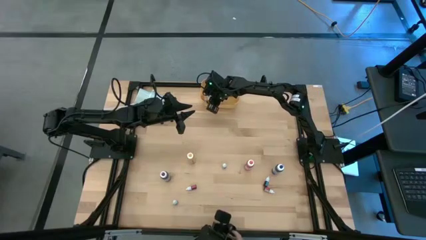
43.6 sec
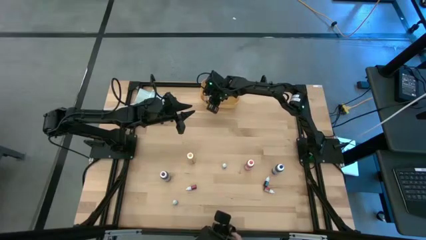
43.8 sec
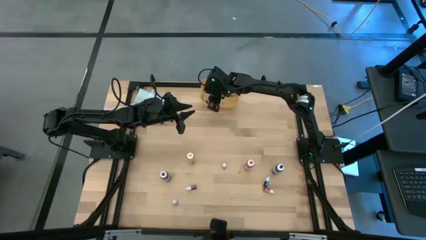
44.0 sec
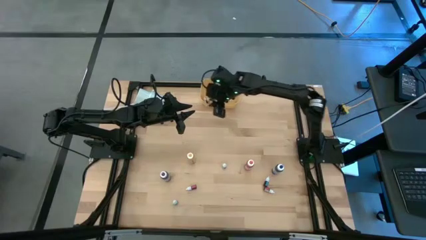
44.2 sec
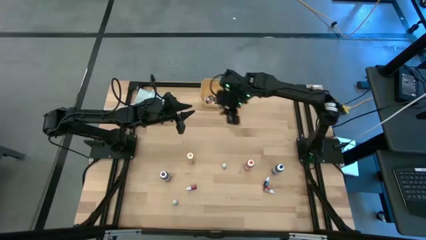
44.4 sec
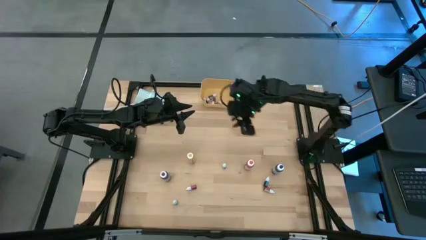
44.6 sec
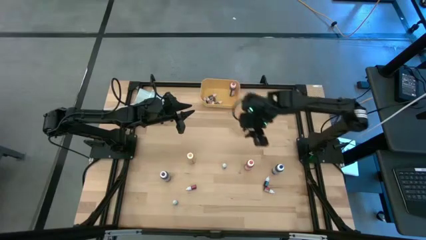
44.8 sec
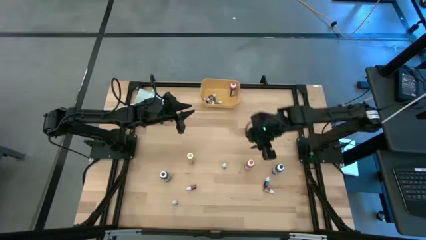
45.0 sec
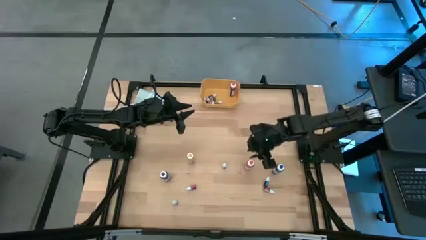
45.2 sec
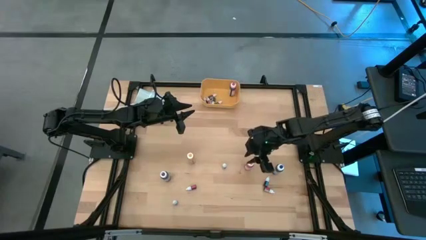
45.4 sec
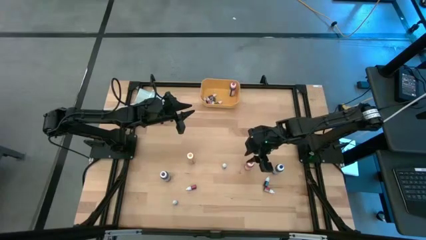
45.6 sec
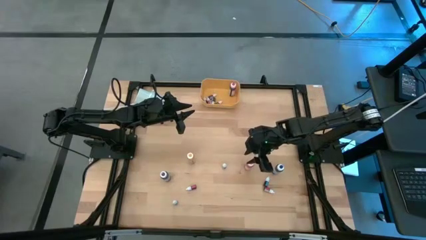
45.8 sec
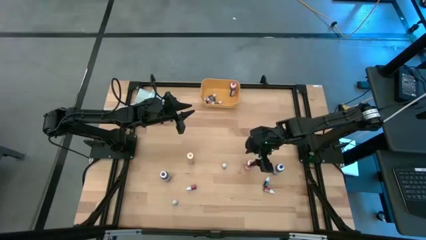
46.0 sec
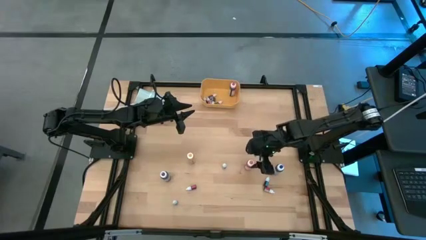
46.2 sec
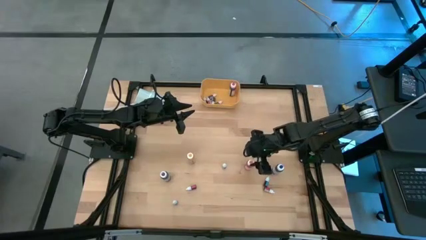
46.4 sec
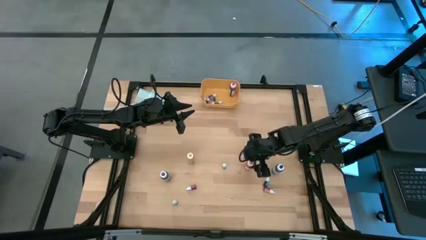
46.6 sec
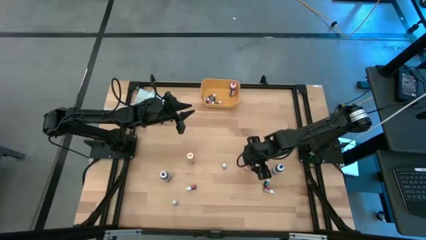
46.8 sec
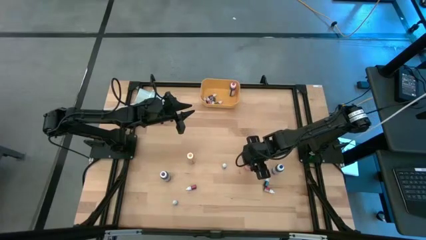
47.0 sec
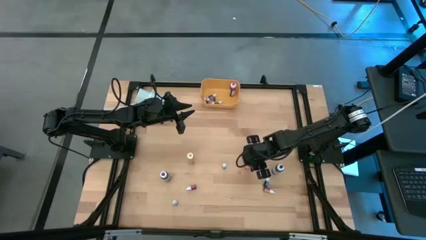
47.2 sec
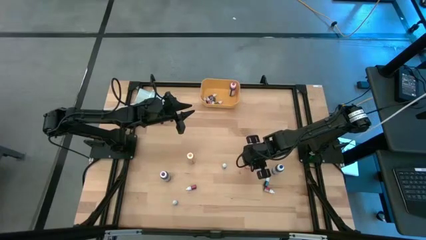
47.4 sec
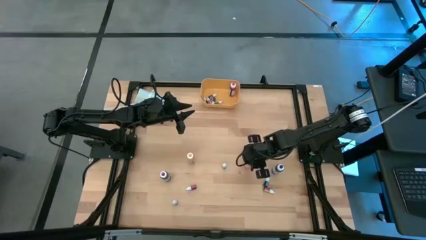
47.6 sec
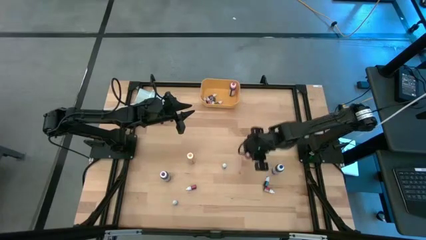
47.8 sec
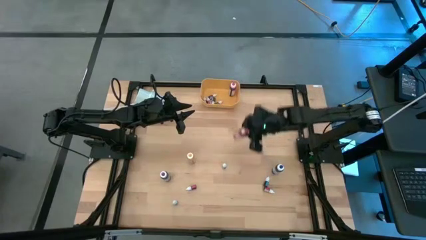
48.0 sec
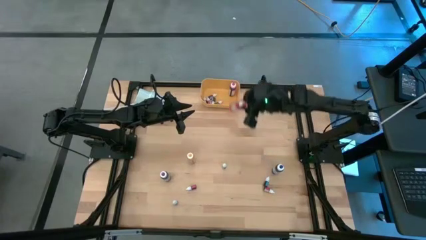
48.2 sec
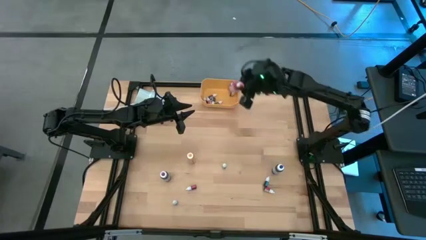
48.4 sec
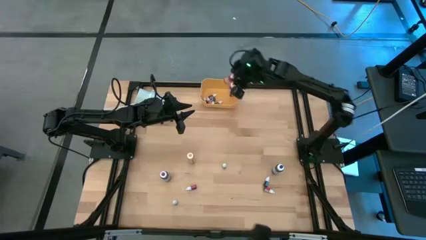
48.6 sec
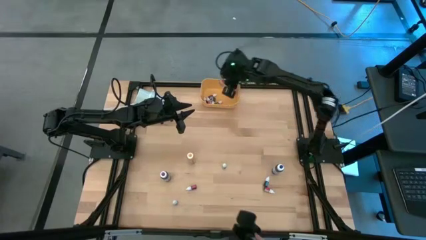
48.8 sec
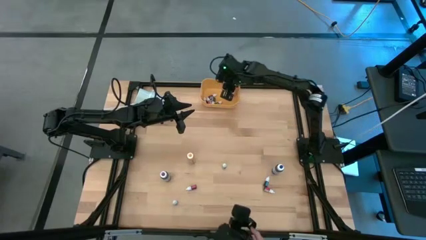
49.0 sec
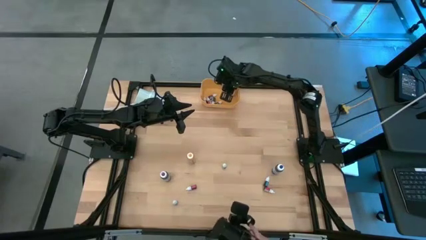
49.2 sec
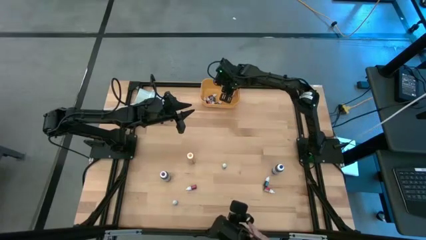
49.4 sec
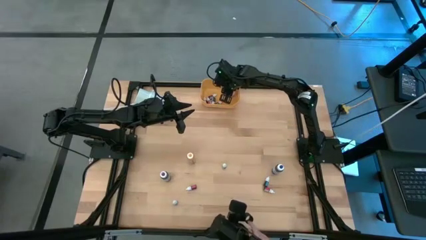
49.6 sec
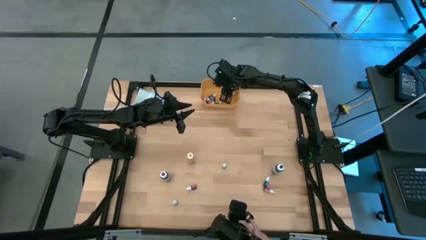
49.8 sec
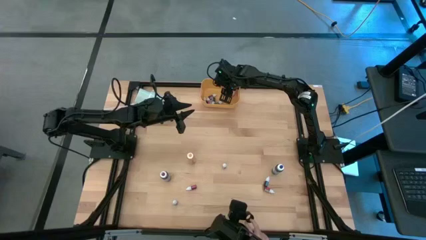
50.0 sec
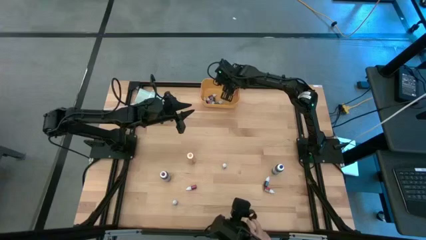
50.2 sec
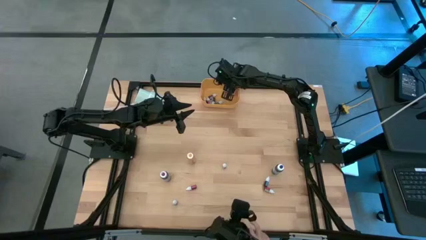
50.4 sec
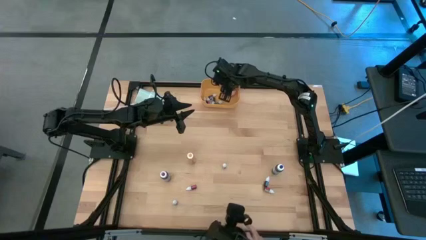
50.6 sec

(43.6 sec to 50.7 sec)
Task: Pick & Place food coloring
Put the orange food coloring bottle into the yellow bin

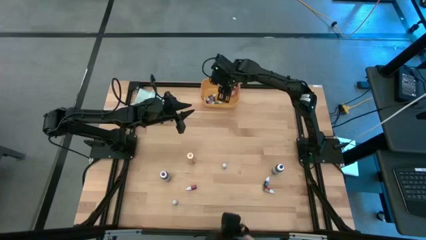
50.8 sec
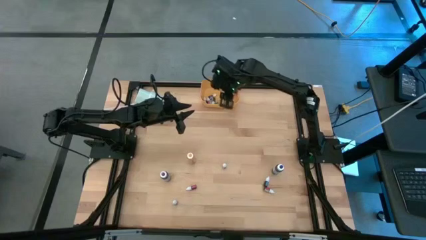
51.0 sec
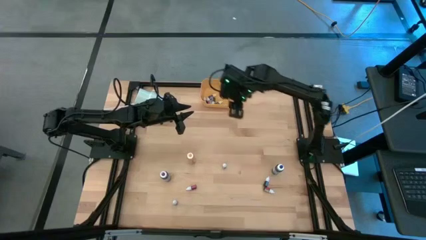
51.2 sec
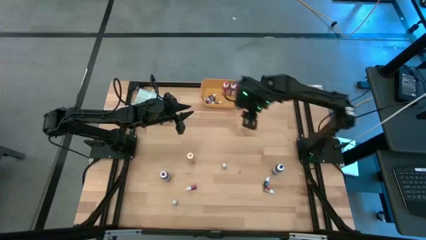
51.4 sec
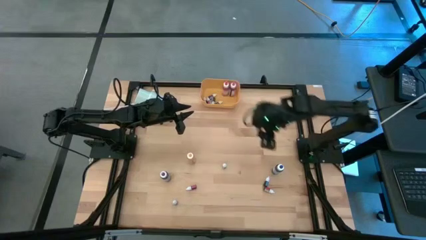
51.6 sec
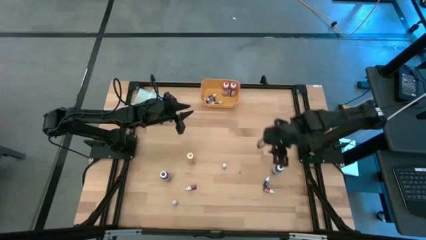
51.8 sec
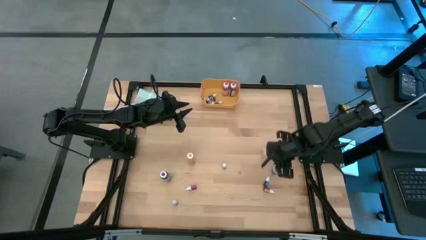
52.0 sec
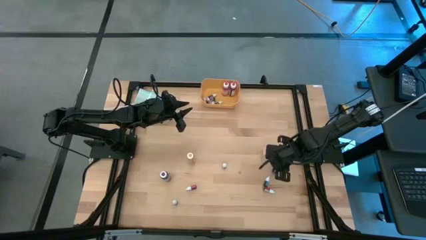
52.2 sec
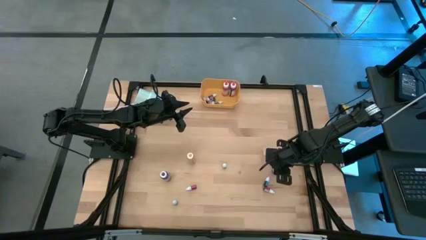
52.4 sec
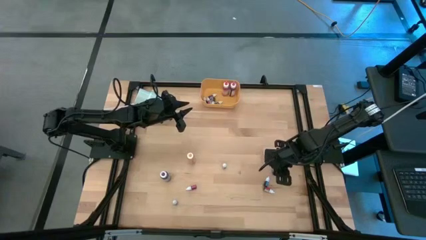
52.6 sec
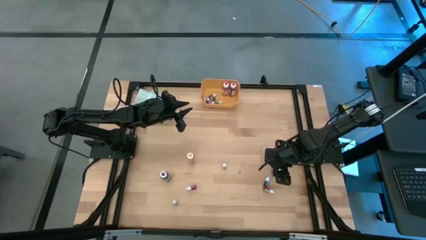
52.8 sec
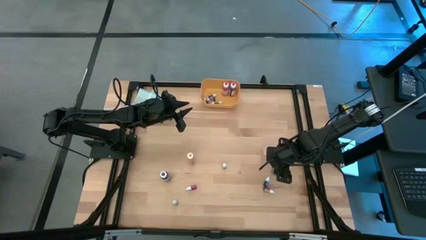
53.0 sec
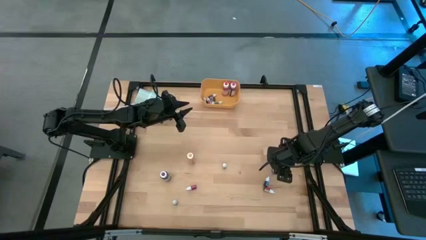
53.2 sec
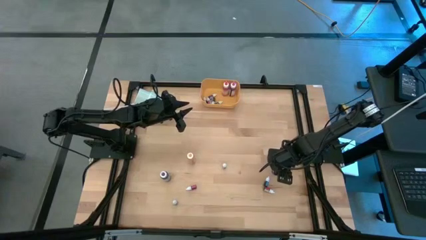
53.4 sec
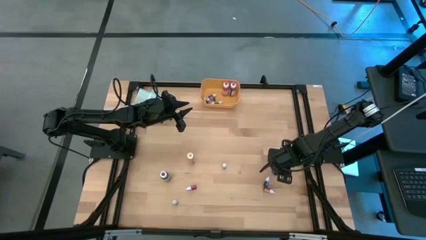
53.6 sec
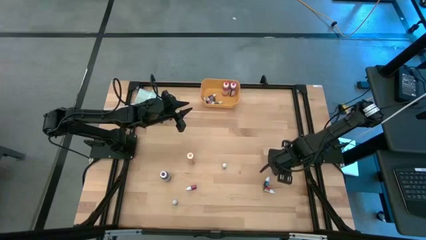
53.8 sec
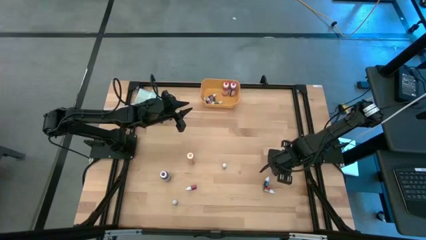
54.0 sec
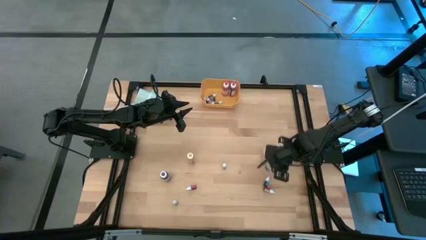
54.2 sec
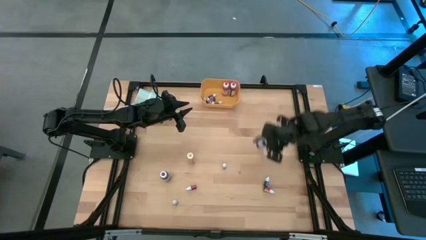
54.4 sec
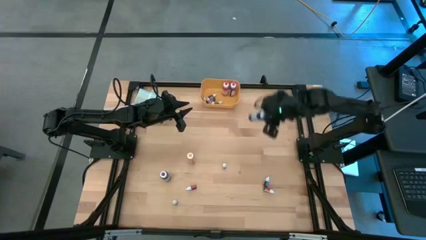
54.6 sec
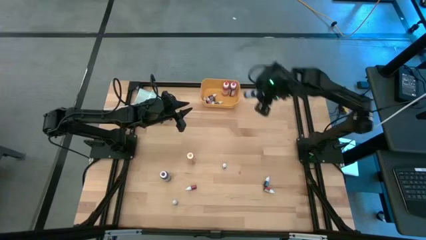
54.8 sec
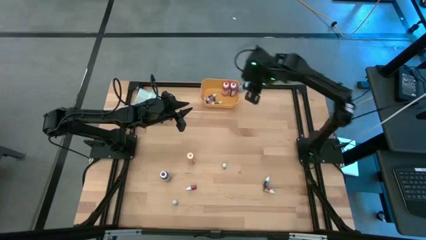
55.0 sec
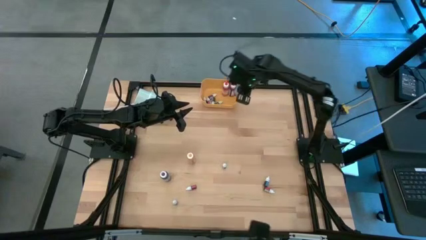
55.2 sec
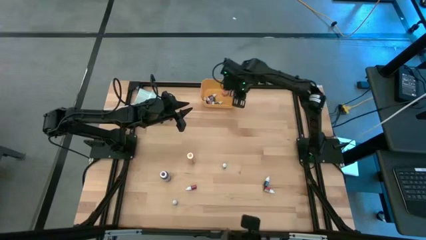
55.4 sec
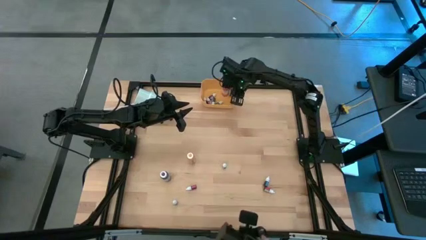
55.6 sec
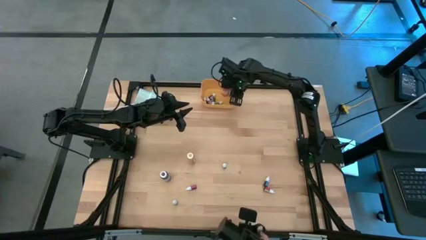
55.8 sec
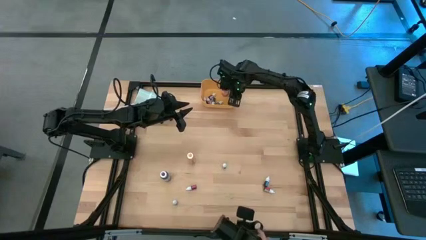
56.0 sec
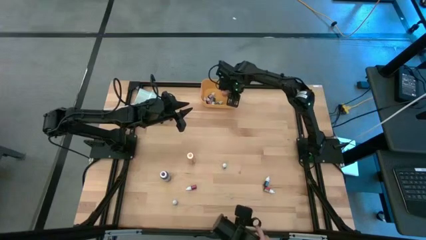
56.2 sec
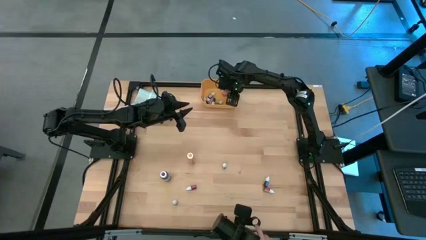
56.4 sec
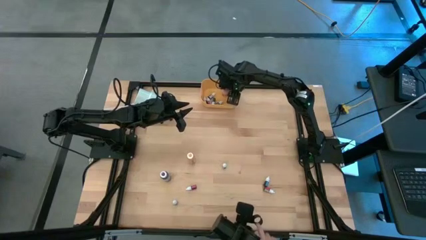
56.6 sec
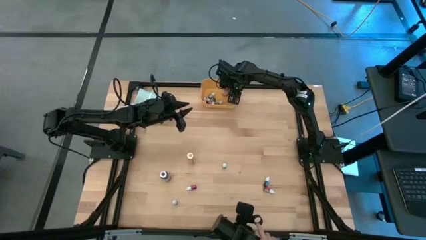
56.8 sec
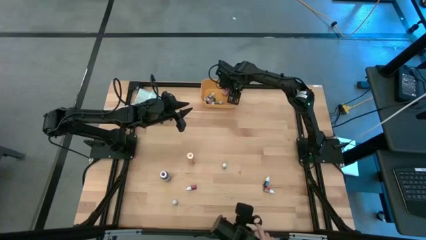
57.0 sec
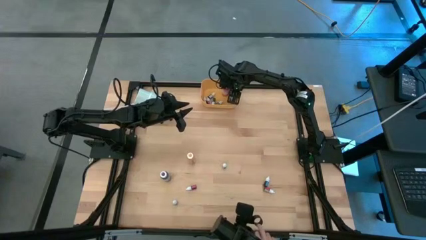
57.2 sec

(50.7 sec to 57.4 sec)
Put the big blue food coloring bottle into the yellow bin

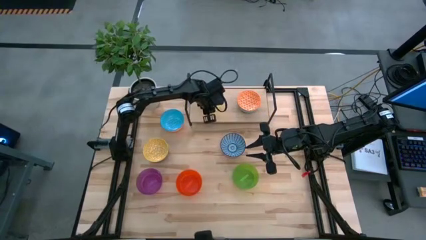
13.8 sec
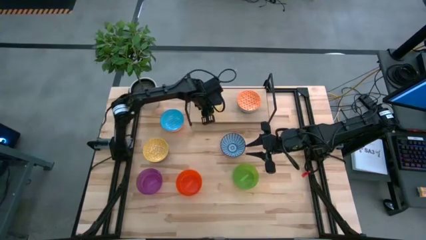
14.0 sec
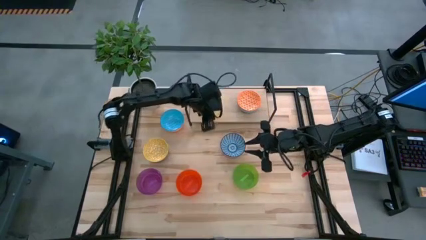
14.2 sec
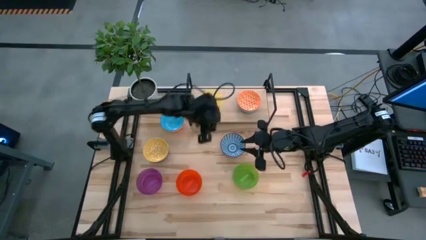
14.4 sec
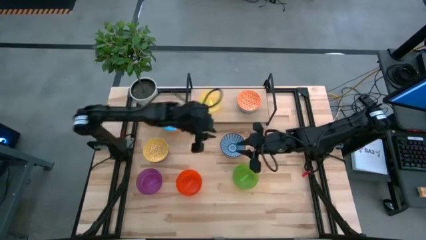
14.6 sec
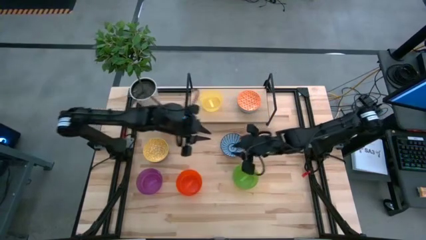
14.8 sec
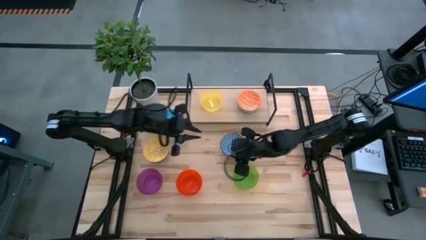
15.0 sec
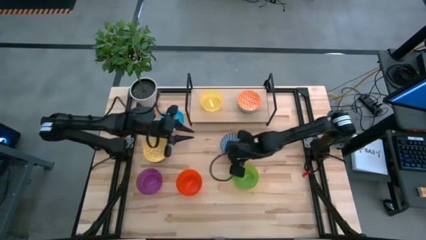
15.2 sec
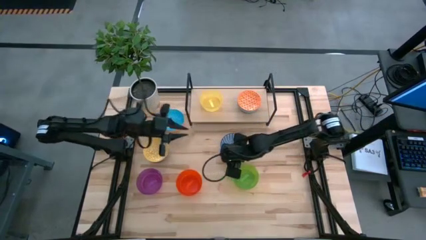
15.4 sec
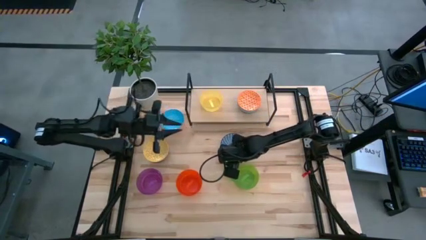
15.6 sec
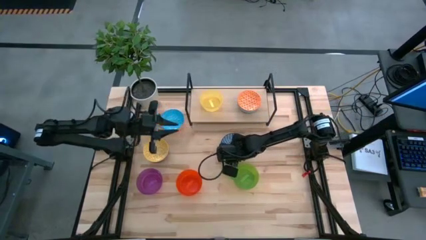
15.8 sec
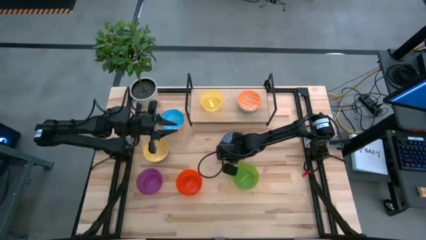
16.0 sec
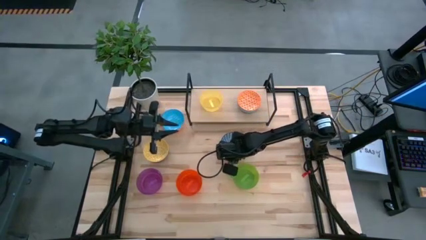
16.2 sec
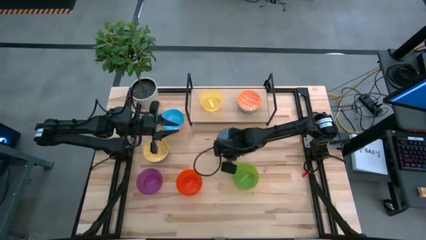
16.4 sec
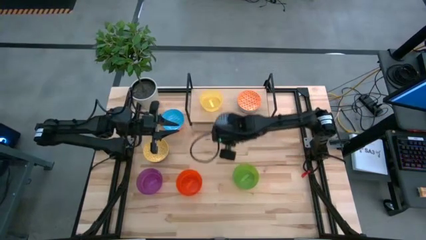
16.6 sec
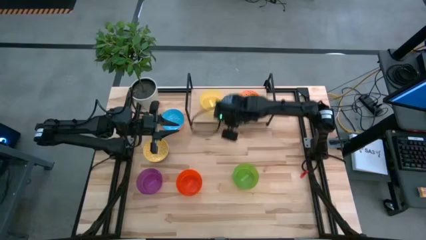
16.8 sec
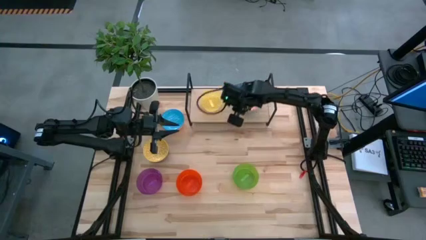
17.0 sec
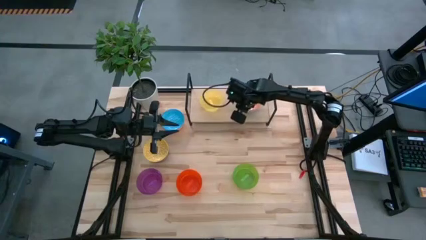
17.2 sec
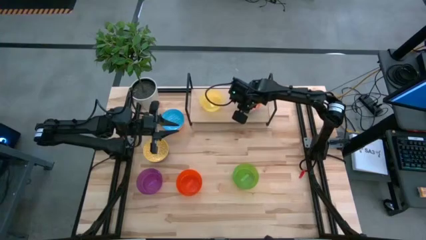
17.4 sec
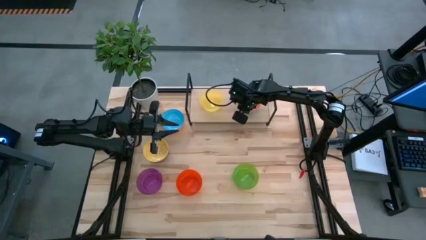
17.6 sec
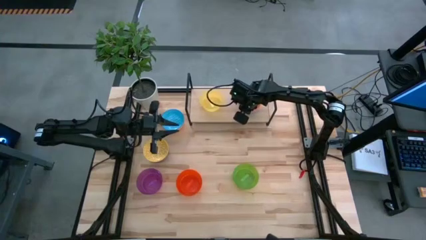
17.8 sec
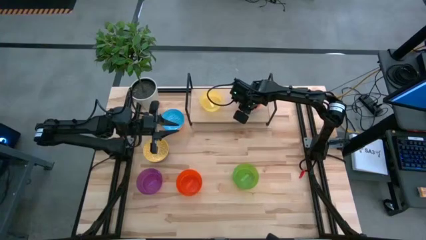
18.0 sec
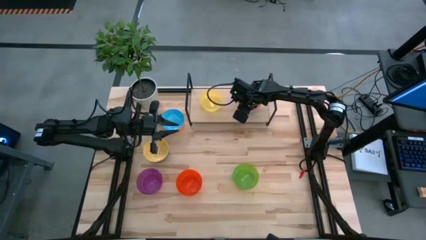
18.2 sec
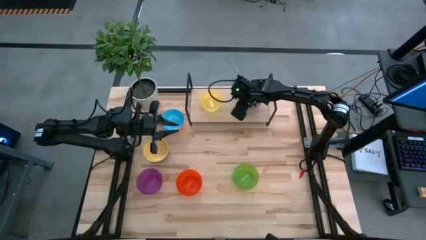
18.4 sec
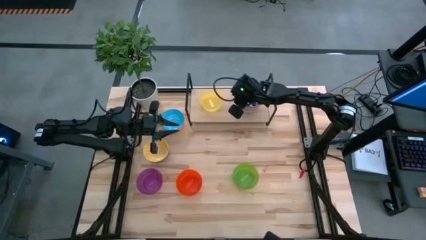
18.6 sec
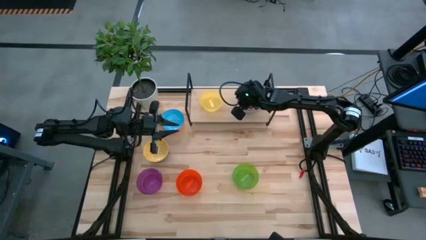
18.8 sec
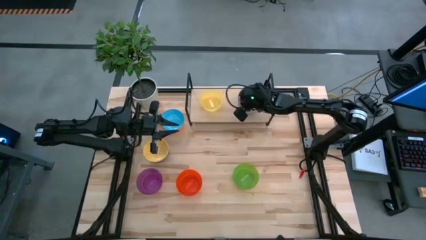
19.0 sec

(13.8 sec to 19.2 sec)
Task: Place and stack bowls onto a shelf
Stack the blue patterned bowl on top of the orange patterned bowl on the shelf
